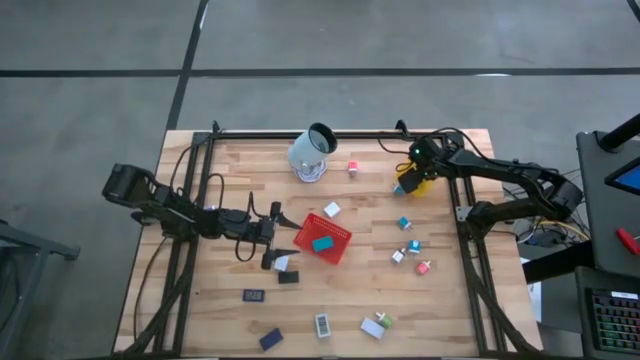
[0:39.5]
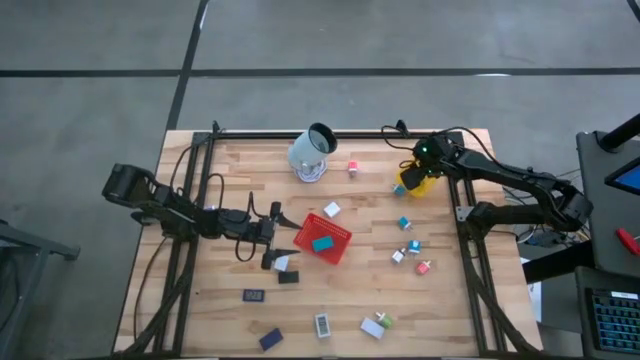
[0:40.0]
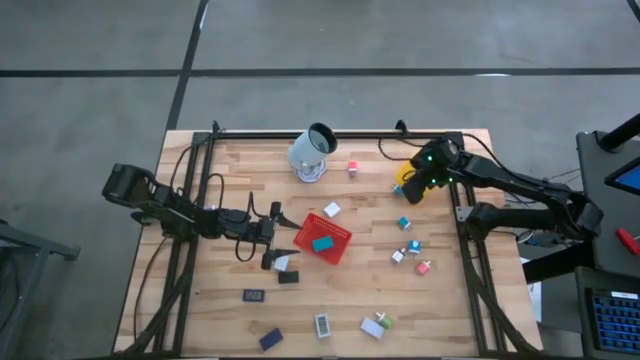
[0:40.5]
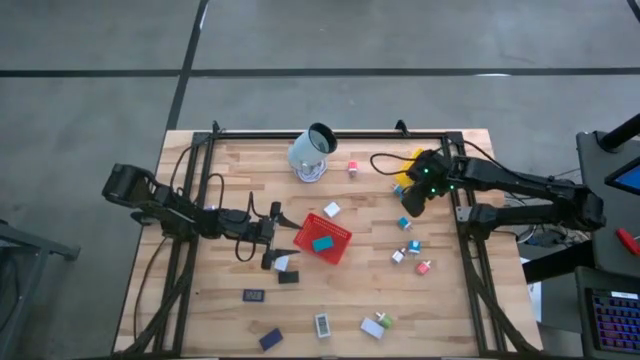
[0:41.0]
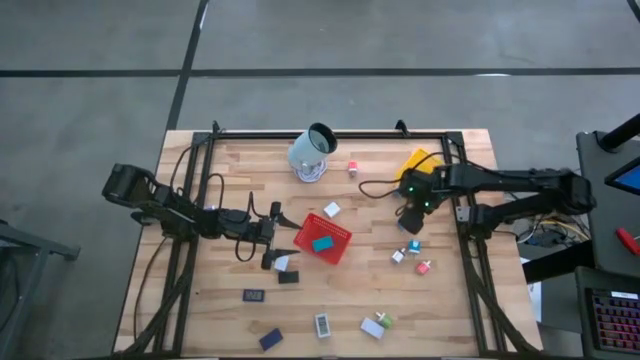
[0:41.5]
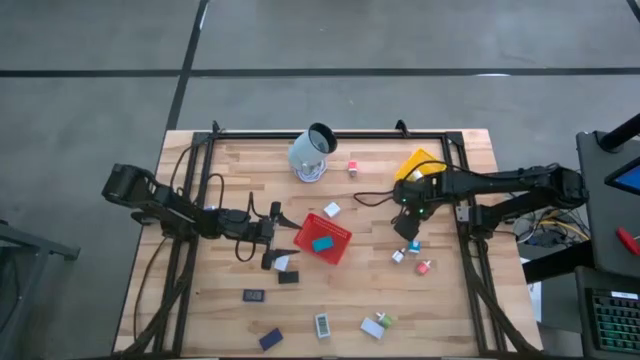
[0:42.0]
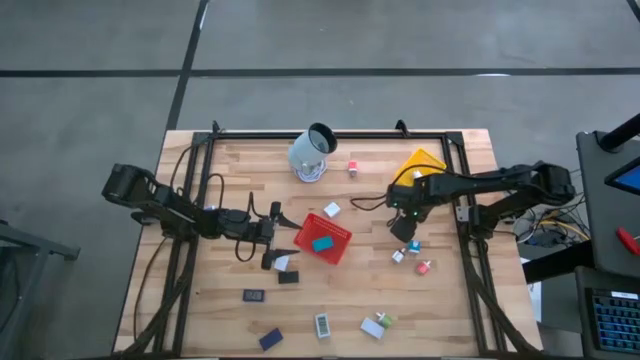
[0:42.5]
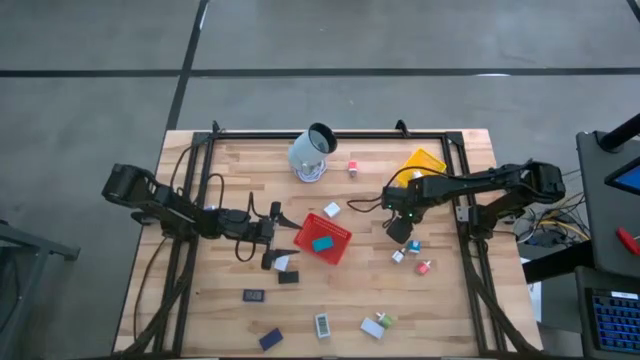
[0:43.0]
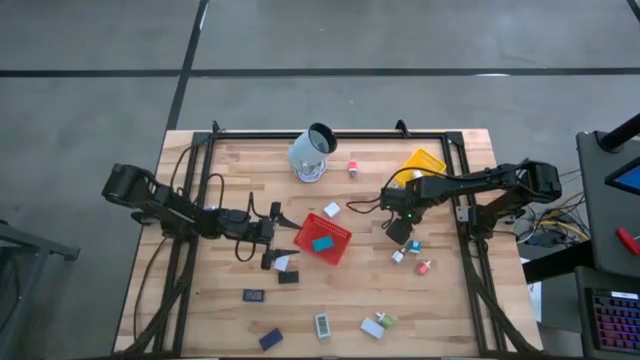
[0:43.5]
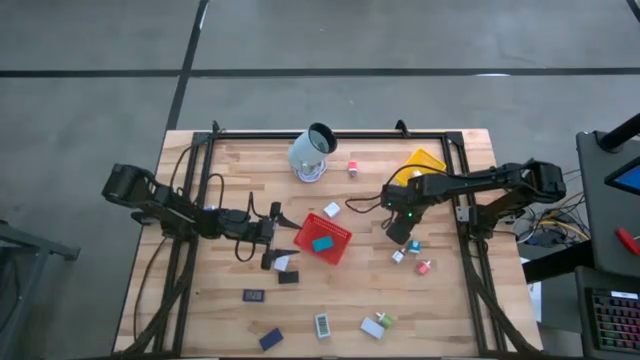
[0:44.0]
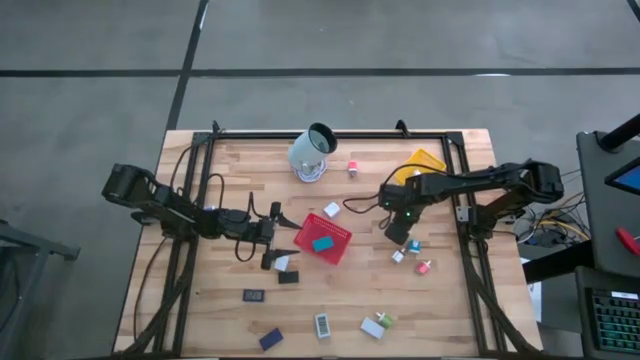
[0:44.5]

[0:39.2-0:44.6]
Task: Pick & Place Office items
Put the middle blue charger adapter into the yellow basket

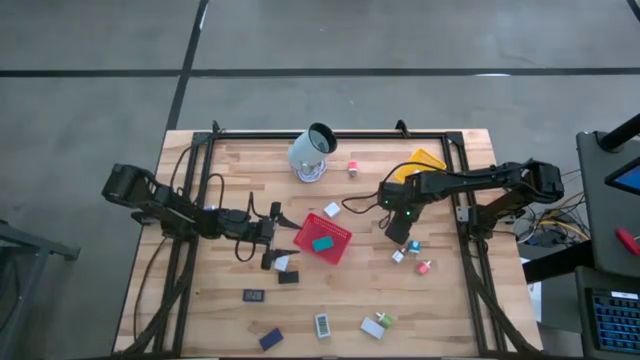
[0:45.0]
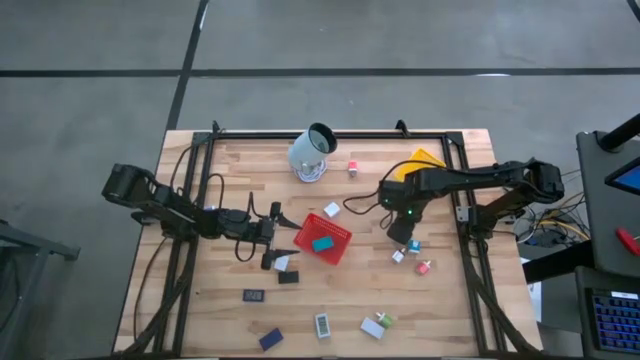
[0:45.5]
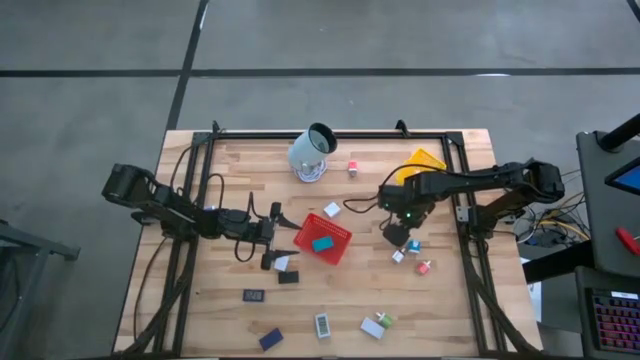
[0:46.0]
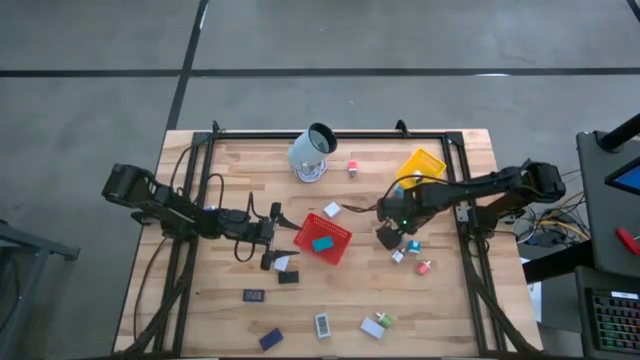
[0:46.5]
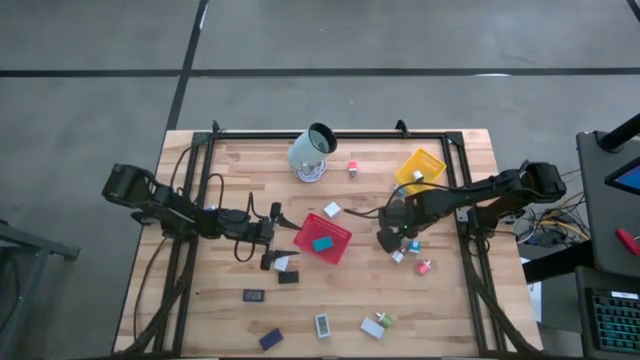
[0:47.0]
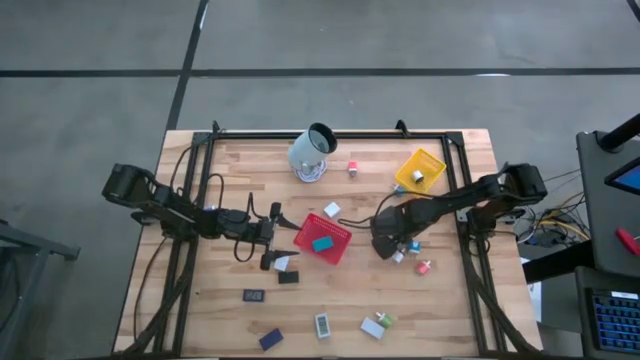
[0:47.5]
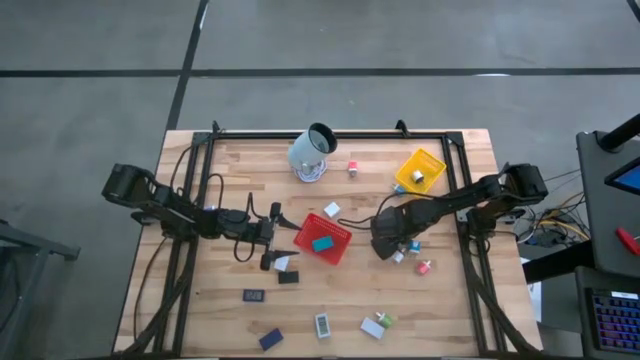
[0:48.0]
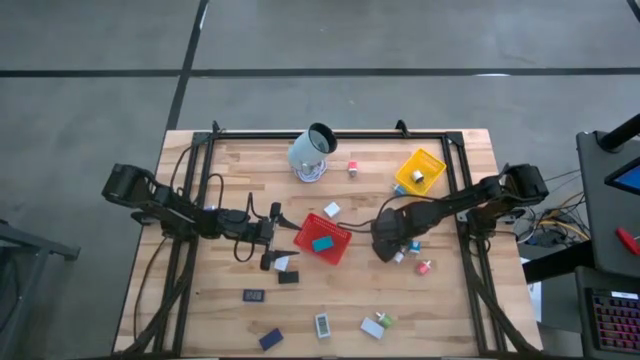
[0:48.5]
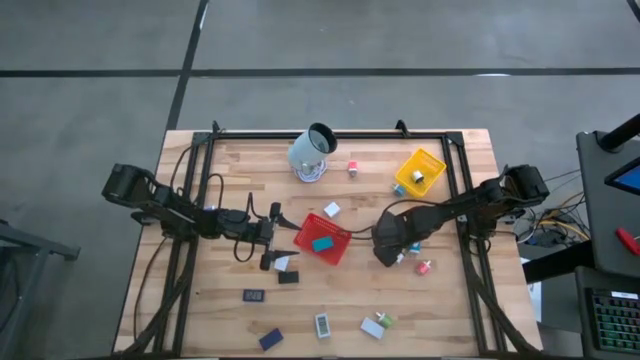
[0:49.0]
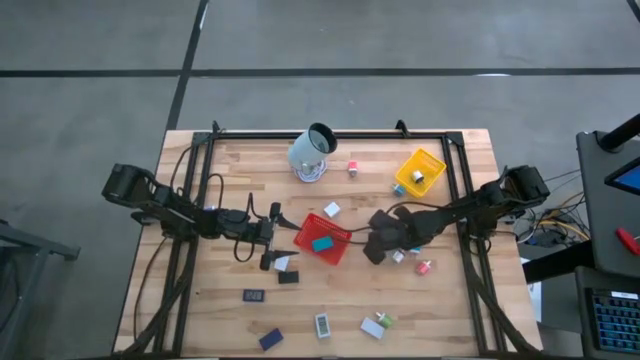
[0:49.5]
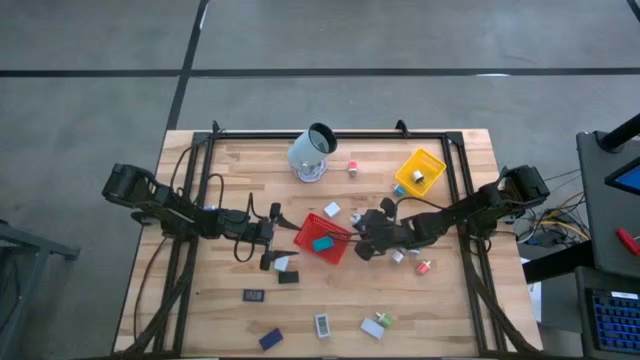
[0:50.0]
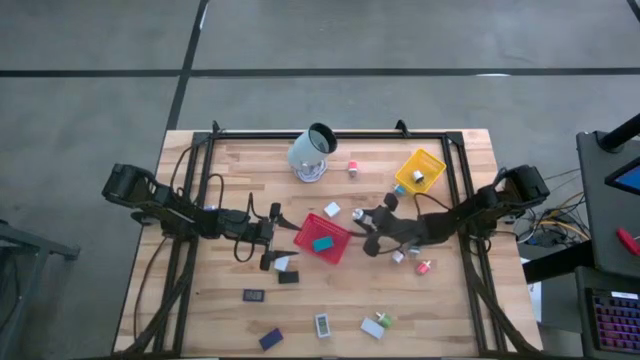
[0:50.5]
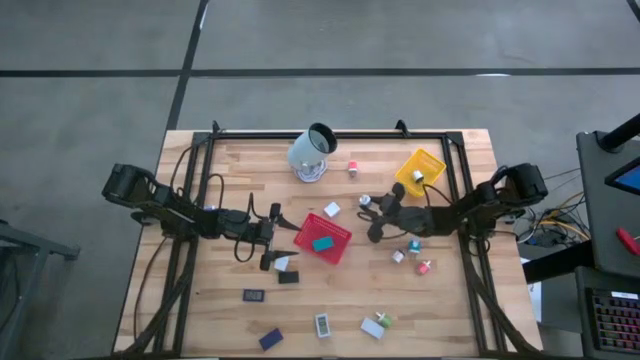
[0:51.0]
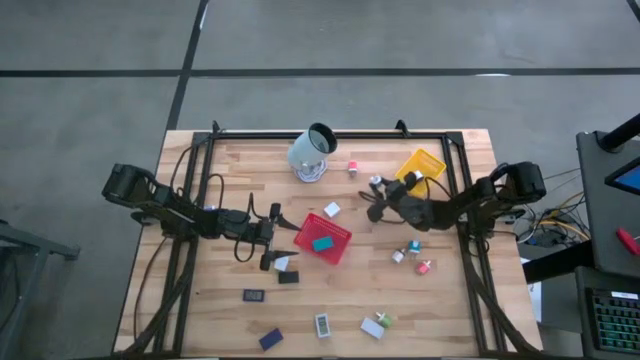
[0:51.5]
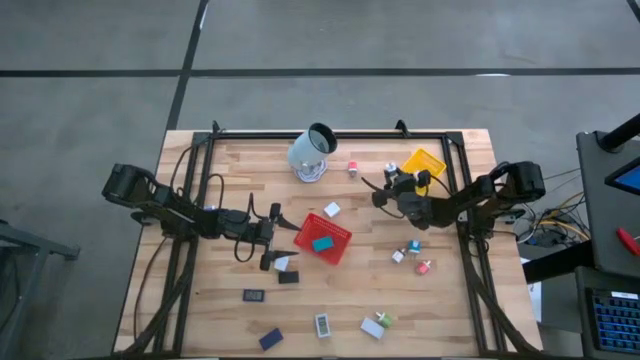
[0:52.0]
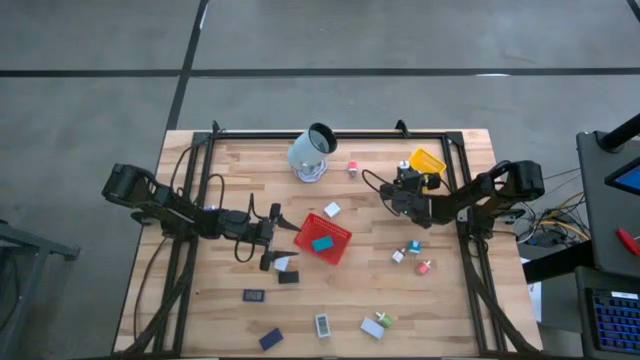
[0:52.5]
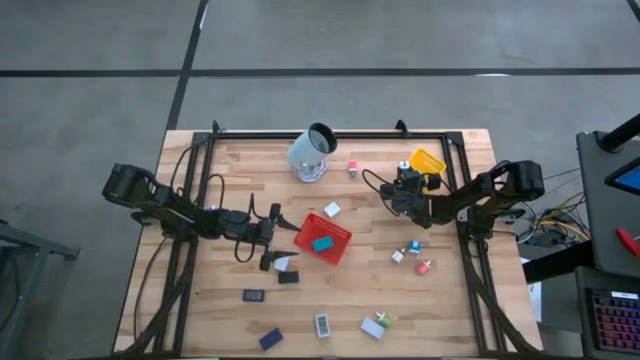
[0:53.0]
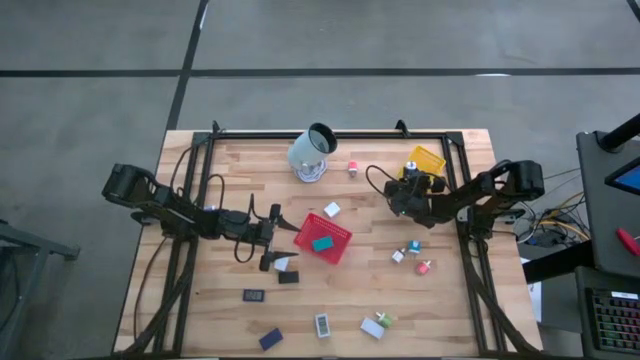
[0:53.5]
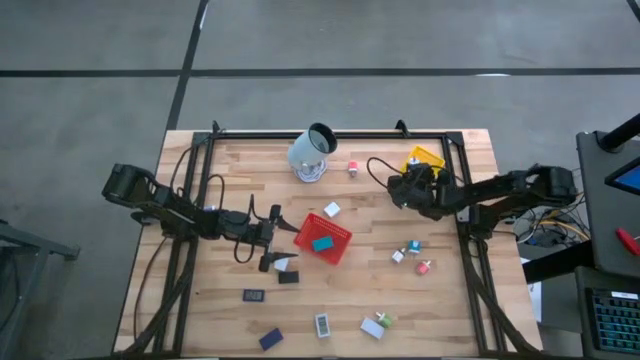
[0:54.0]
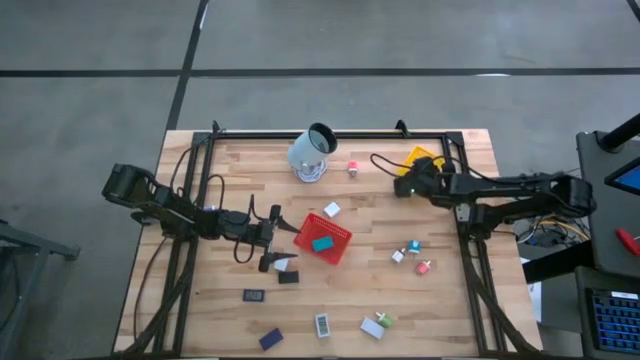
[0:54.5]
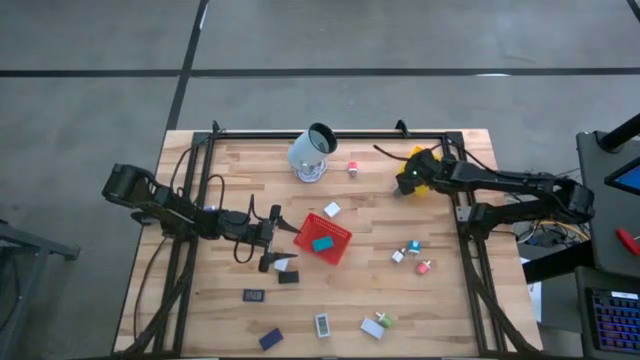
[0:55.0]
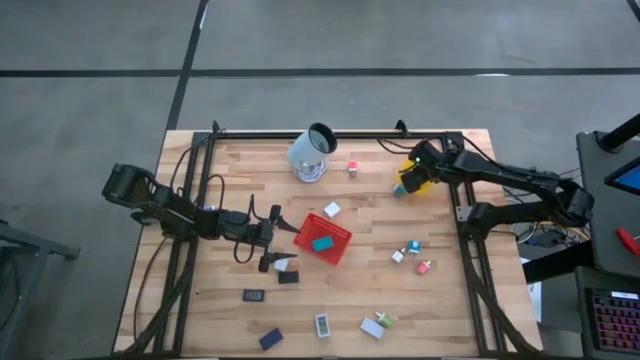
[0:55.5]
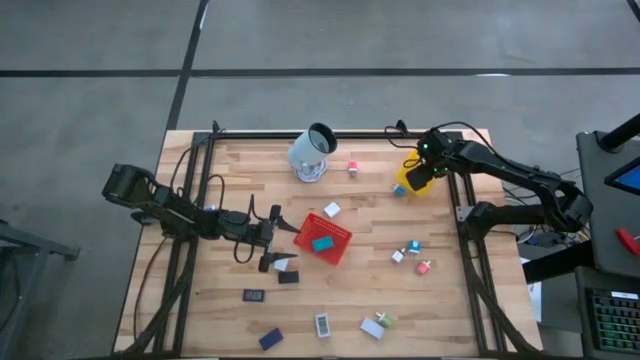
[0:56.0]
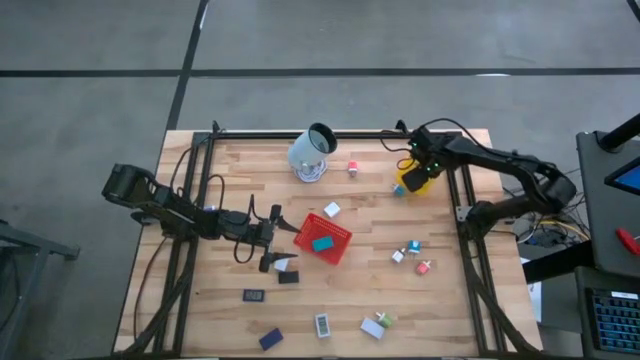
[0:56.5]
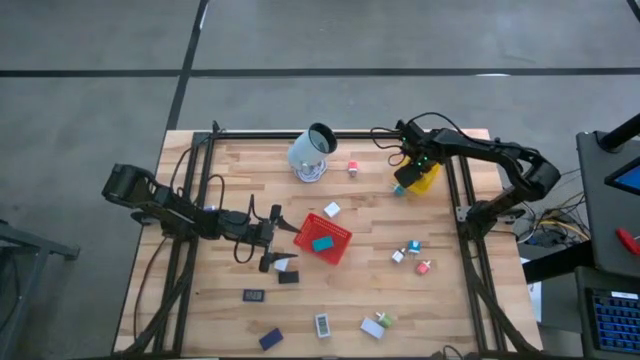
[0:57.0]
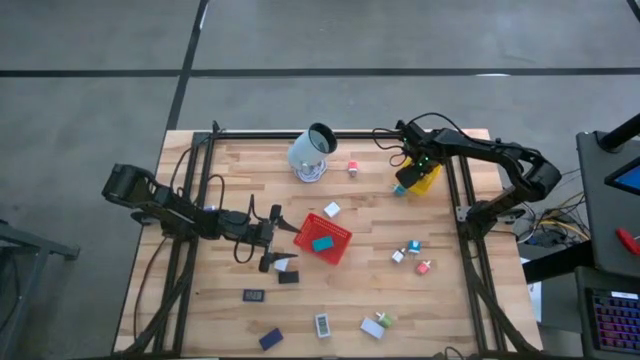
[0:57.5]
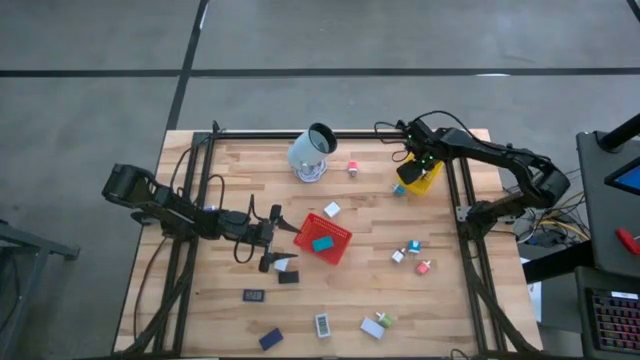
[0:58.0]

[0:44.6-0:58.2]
Put the middle blue charger adapter into the yellow basket
